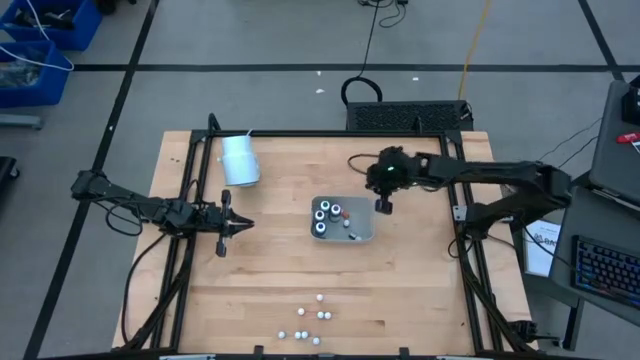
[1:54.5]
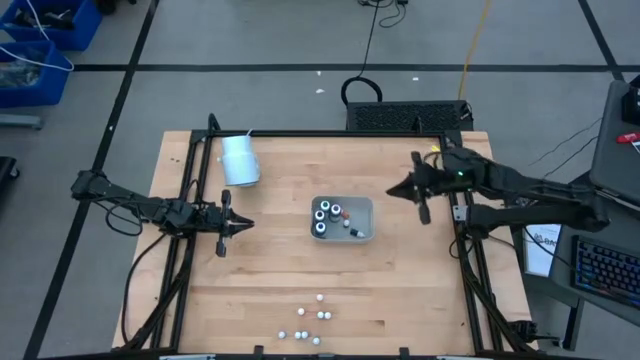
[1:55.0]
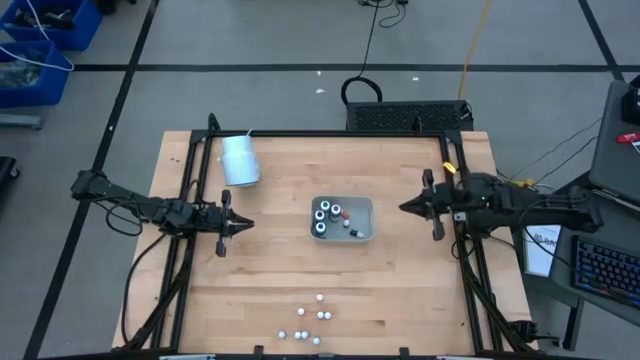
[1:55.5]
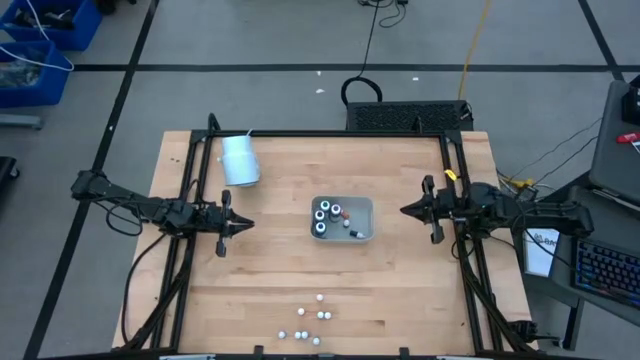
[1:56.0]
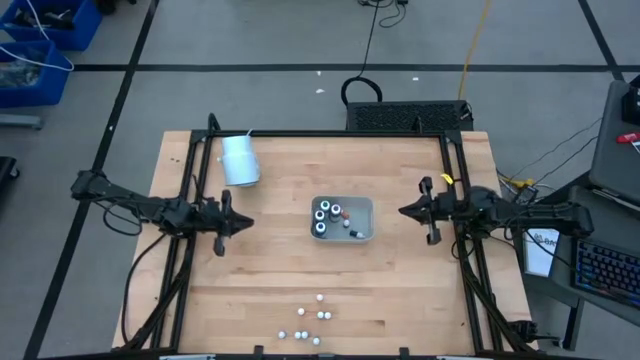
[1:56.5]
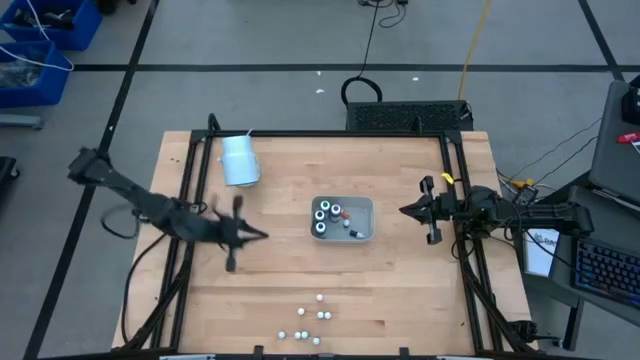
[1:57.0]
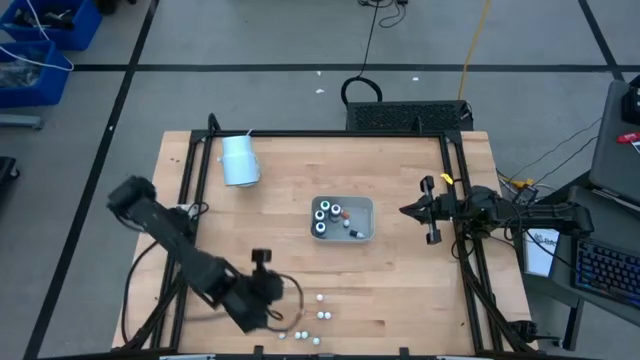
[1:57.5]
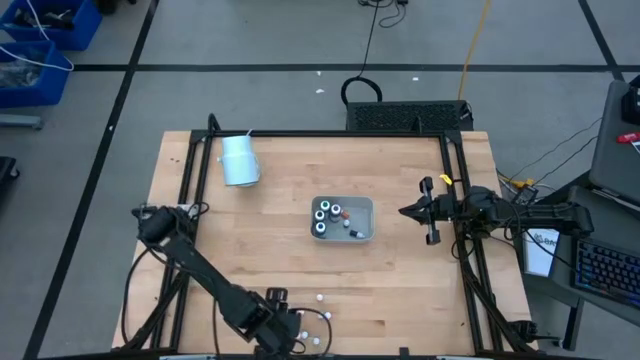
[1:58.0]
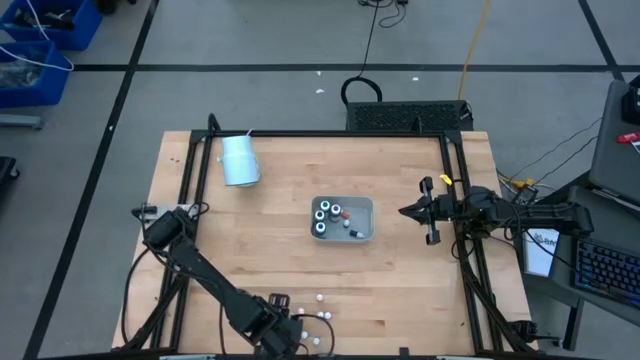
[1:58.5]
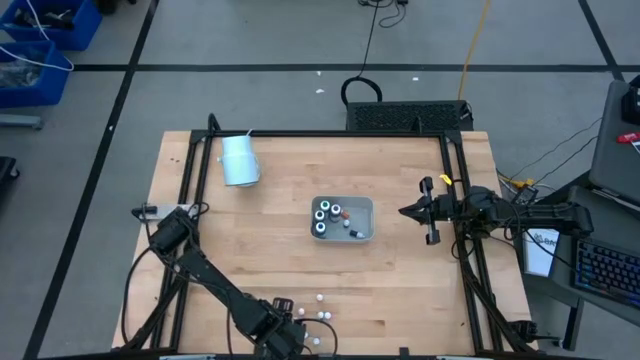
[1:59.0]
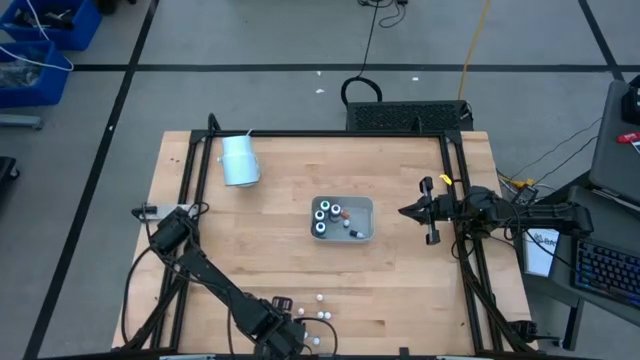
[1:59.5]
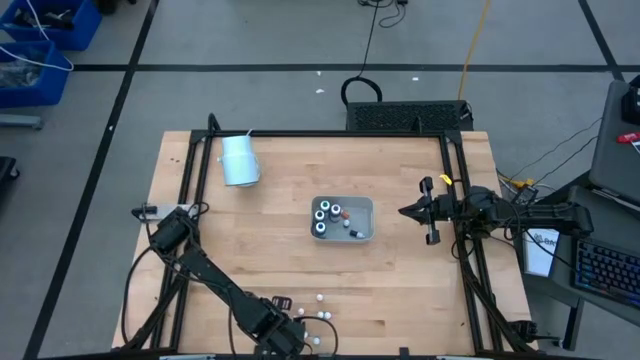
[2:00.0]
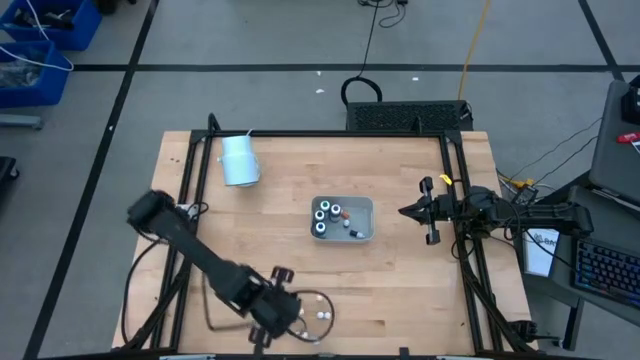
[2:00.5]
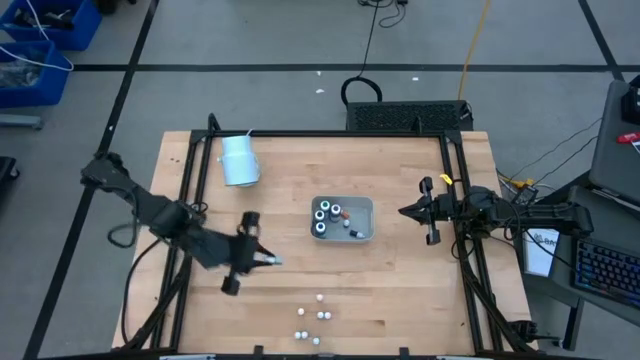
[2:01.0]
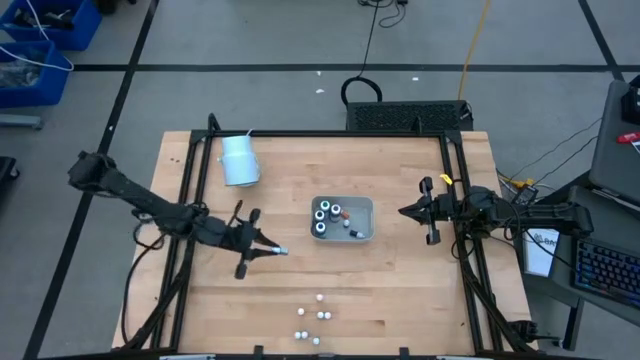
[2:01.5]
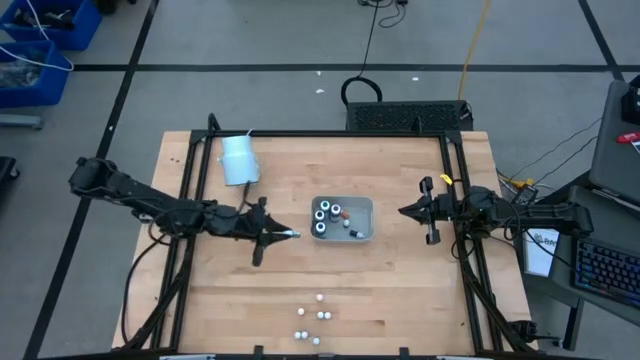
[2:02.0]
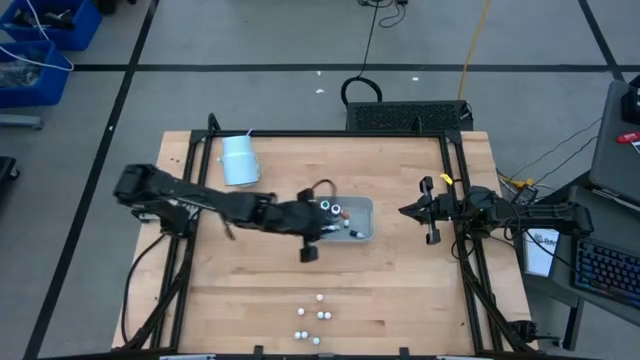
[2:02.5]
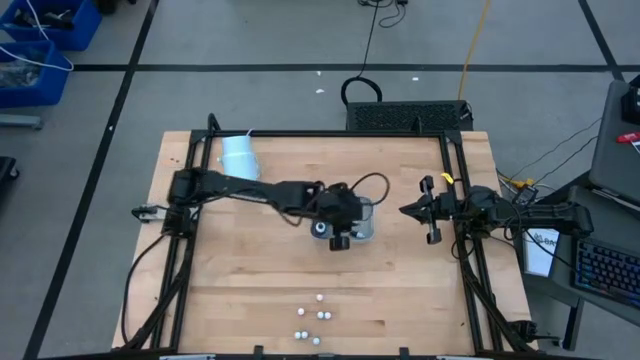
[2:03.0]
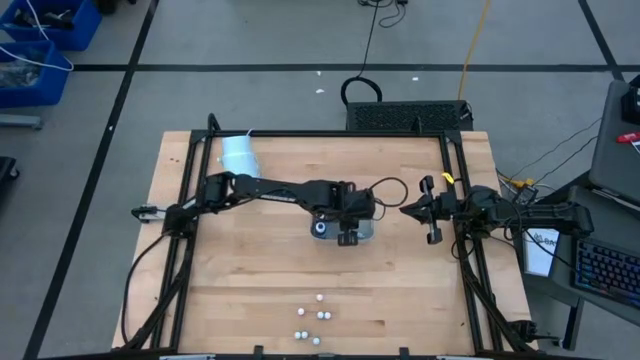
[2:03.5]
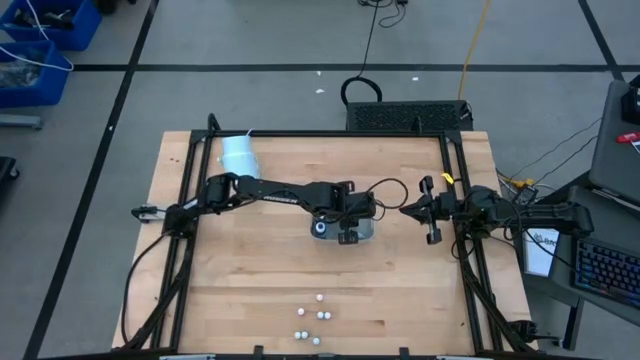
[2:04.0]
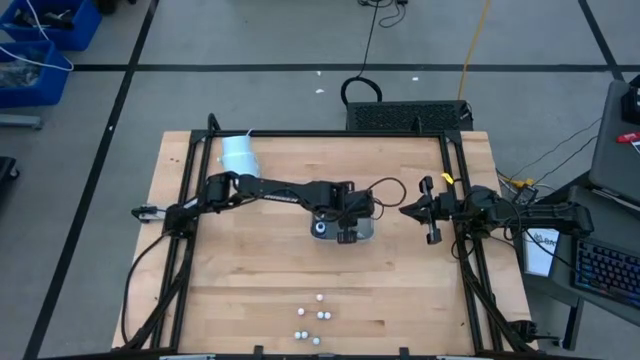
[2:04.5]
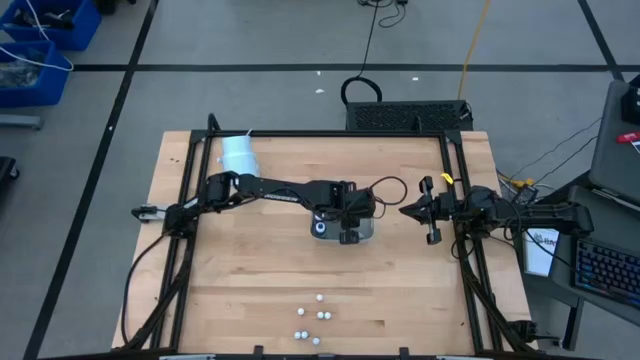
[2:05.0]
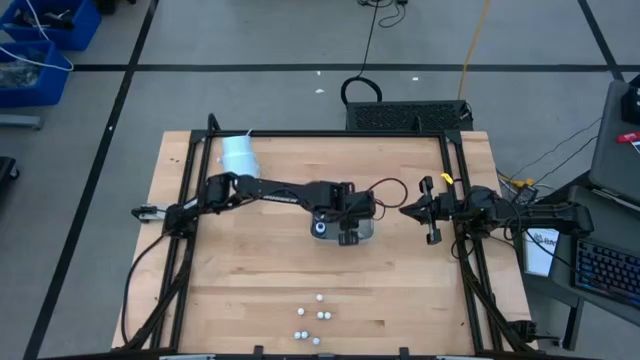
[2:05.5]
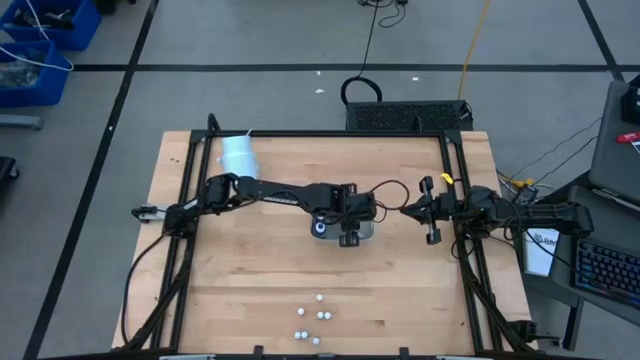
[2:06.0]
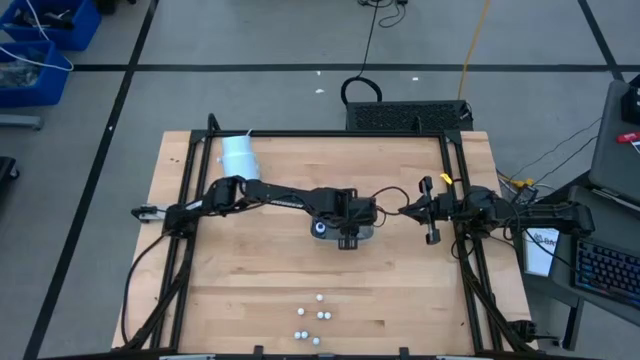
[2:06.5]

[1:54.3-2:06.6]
Task: Pick & Place food coloring
Put the small black food coloring bottle into the bin

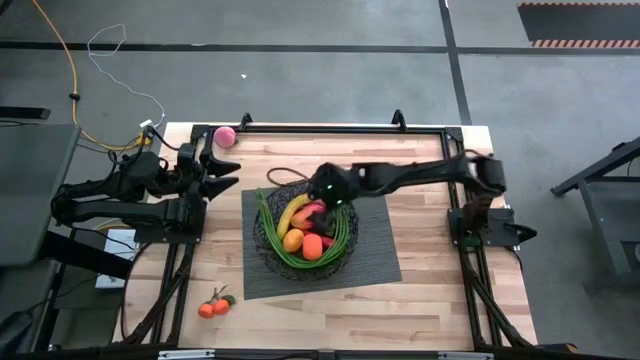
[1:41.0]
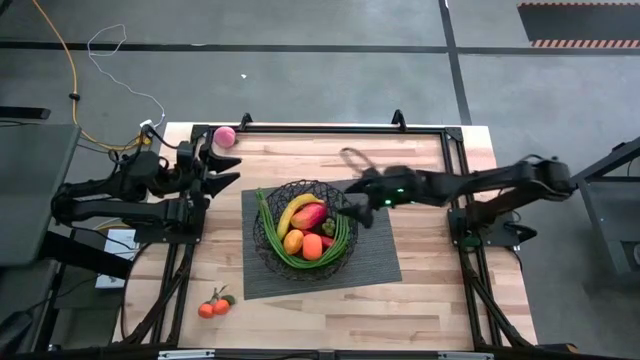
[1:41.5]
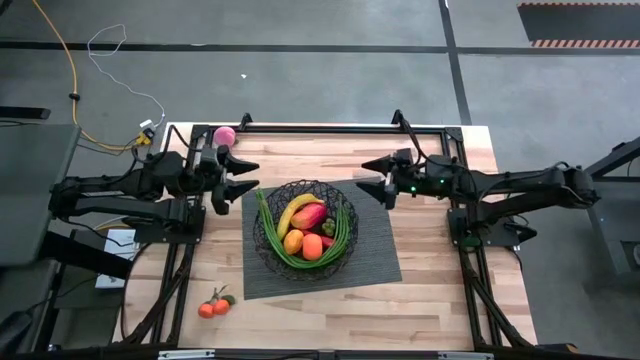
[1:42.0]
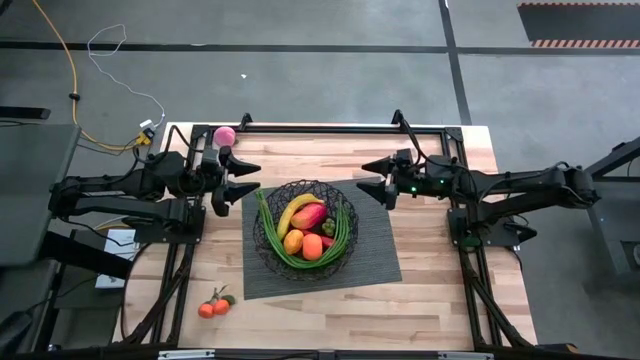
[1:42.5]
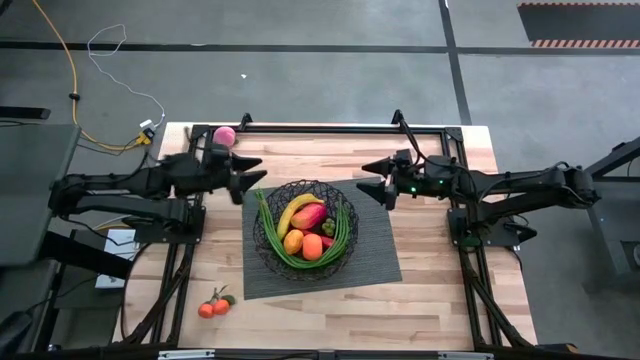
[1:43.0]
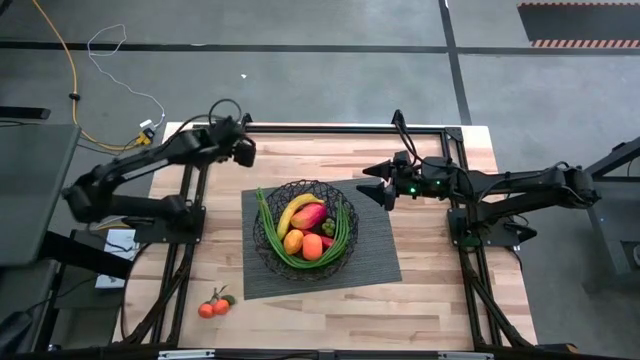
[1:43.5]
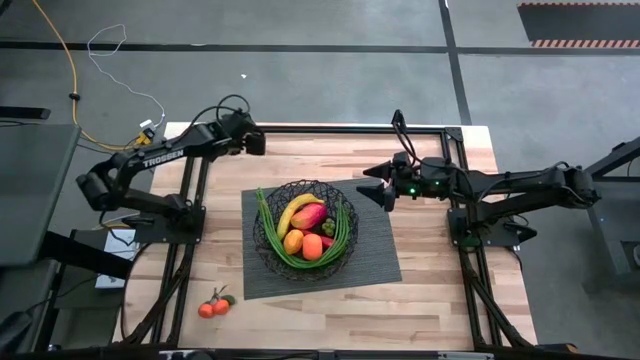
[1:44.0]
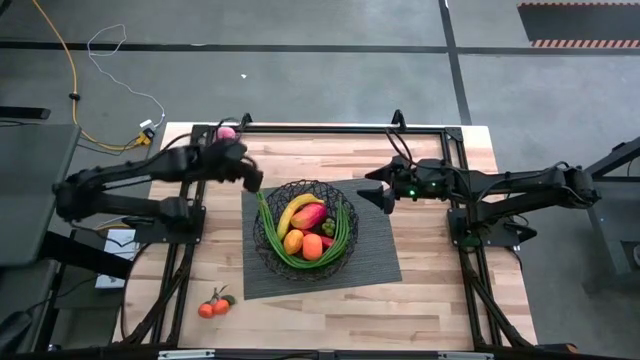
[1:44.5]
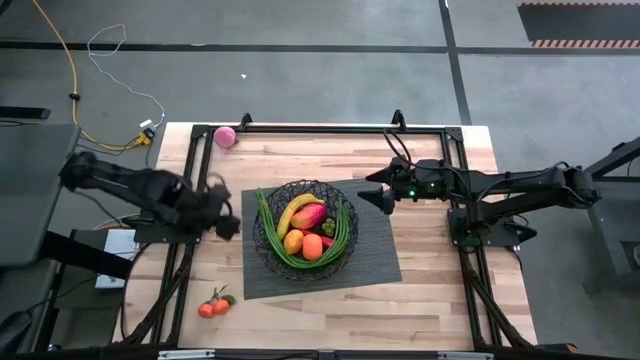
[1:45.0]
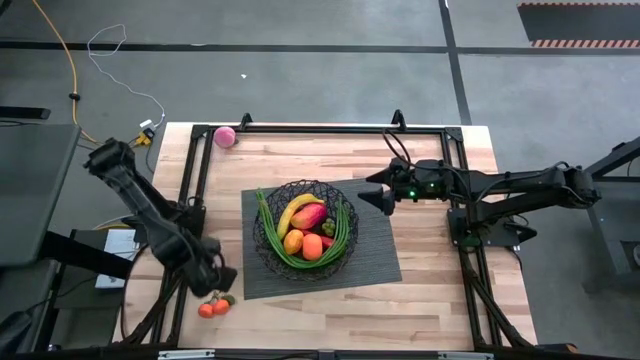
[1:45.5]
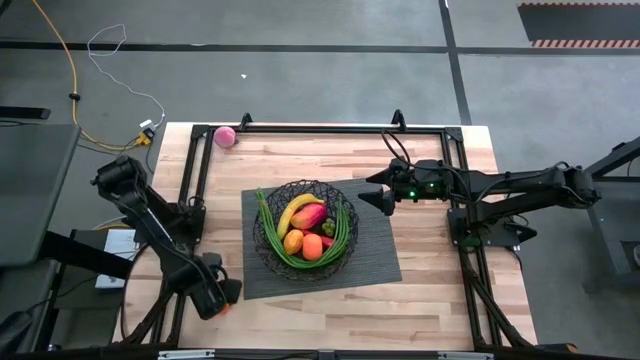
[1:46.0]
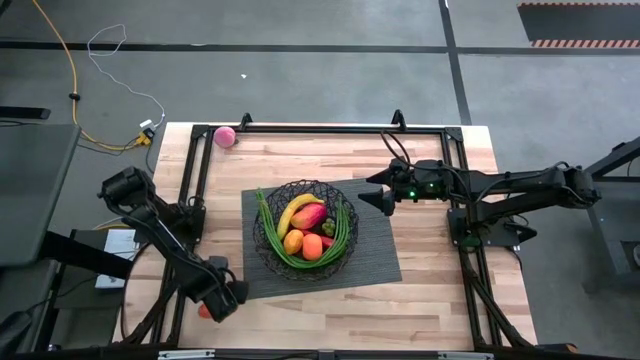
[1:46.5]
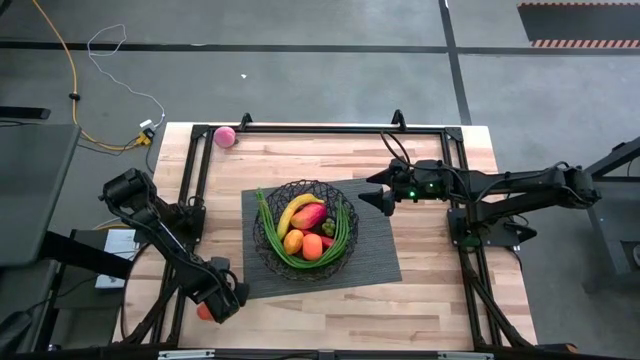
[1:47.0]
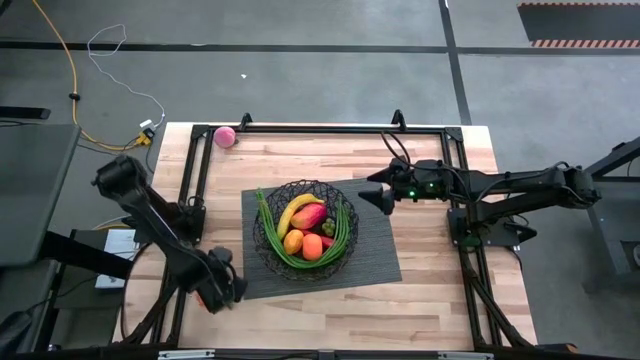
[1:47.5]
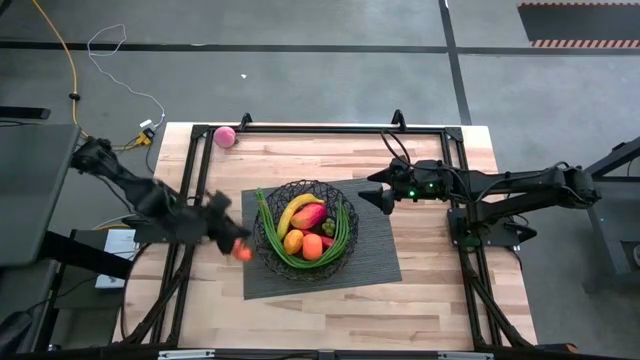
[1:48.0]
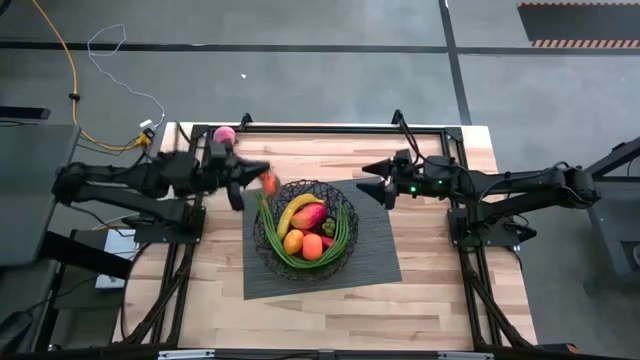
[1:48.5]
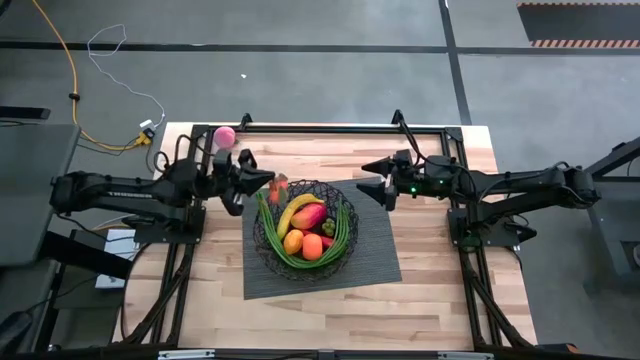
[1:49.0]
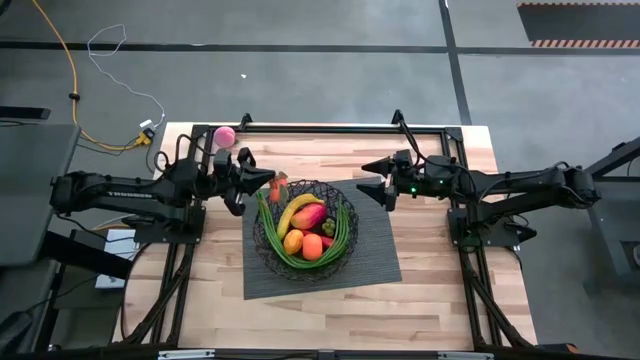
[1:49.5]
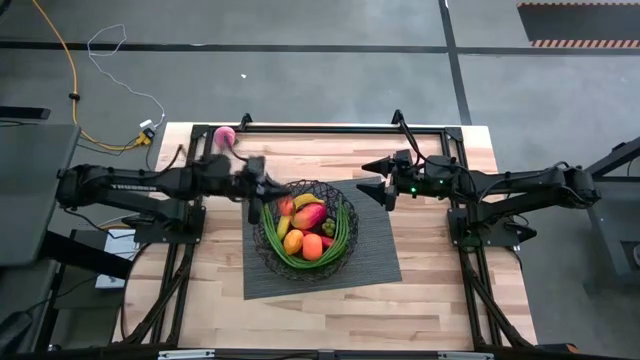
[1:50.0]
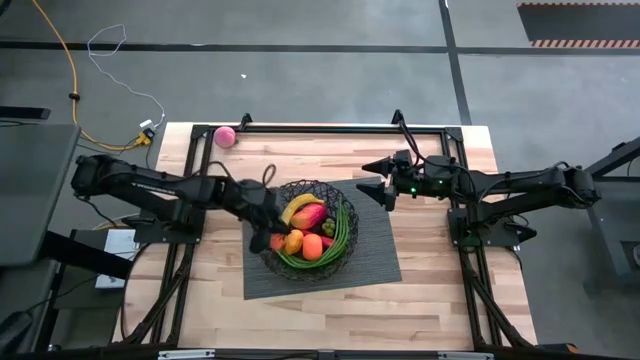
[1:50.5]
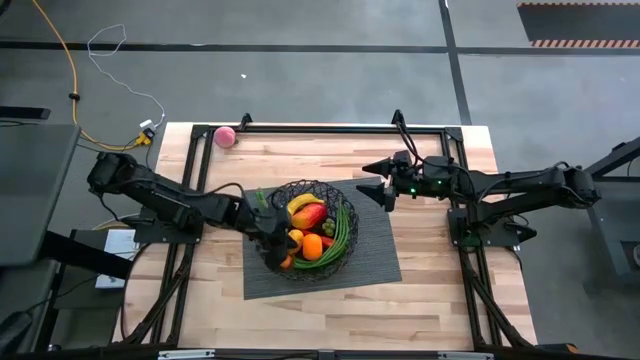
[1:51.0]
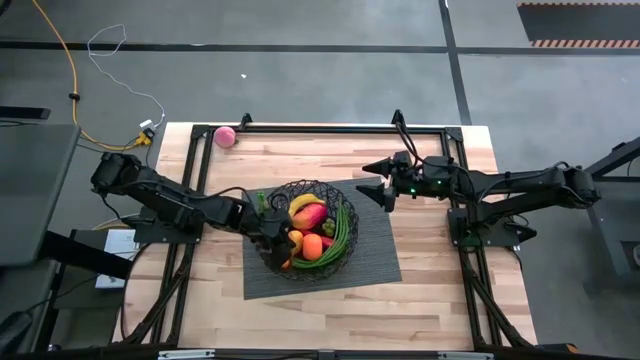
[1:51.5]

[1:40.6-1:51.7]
Task: Build produce basket
Put the orange tangerine into the black mesh basket
